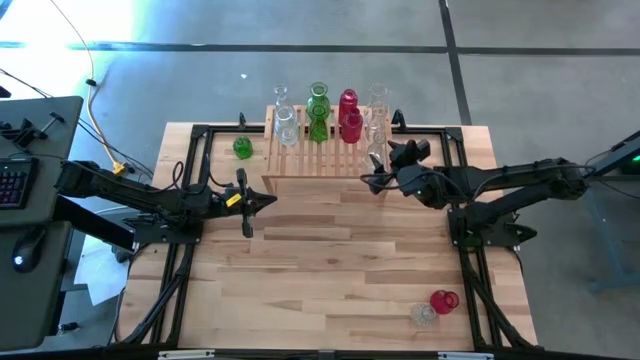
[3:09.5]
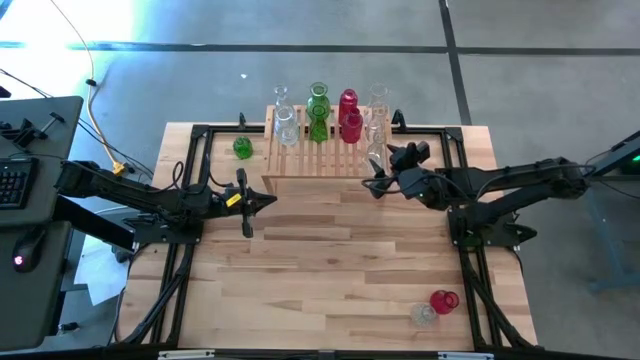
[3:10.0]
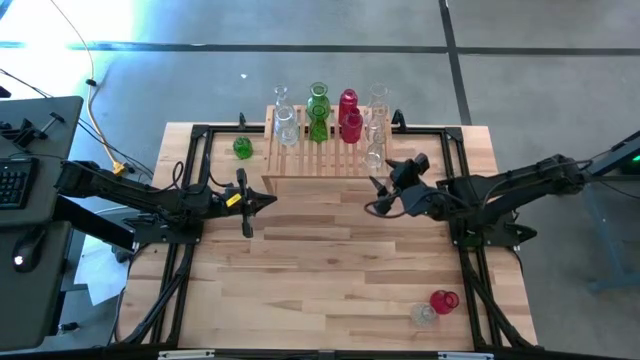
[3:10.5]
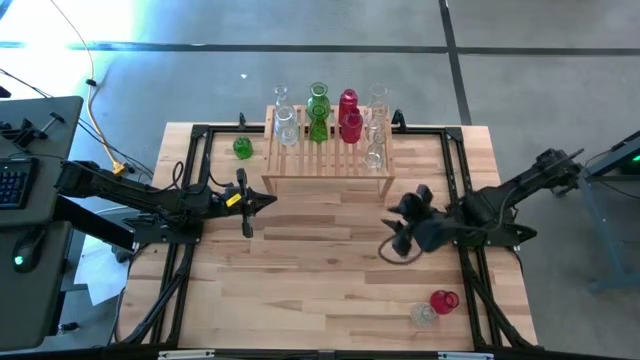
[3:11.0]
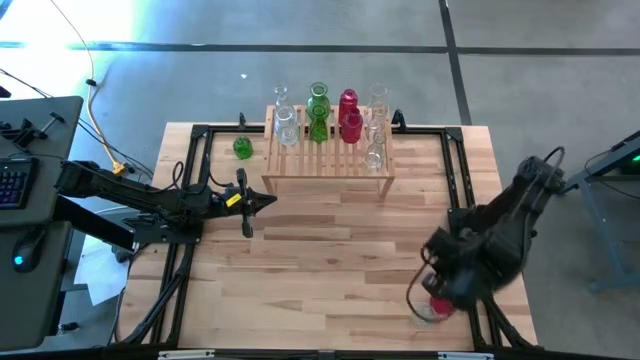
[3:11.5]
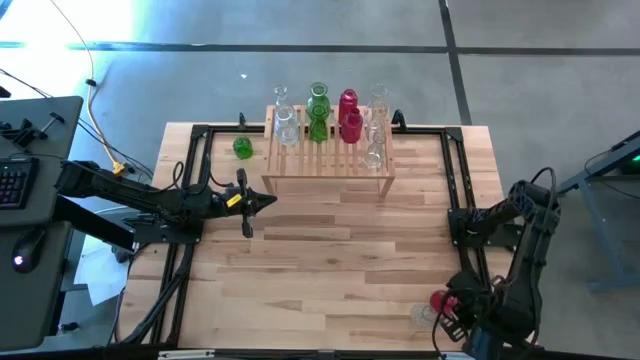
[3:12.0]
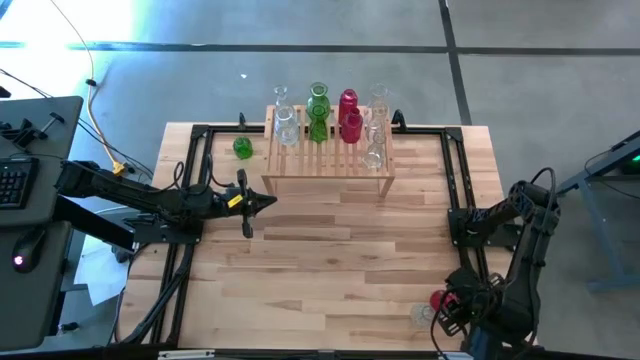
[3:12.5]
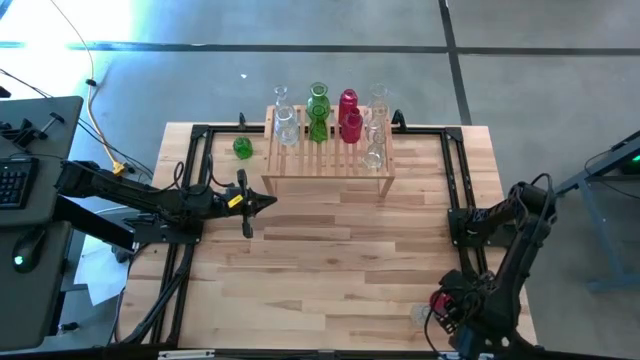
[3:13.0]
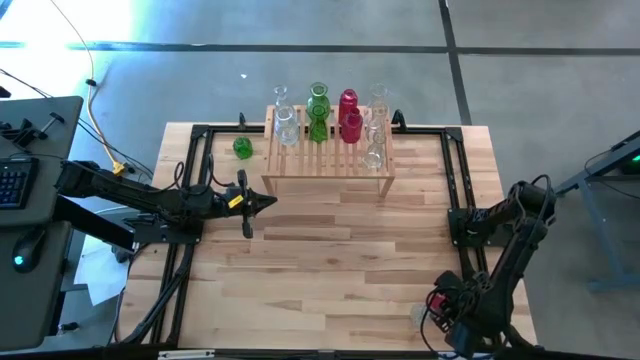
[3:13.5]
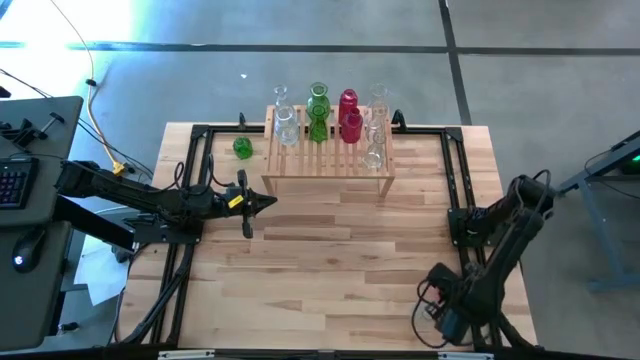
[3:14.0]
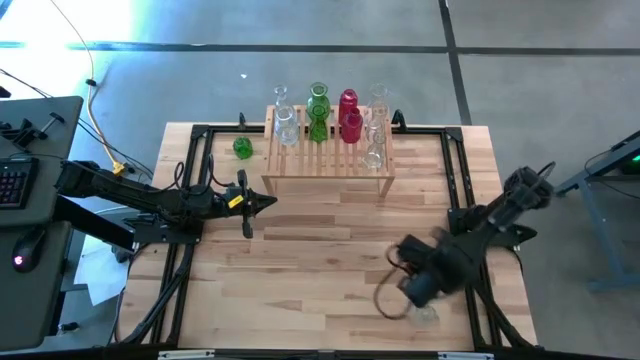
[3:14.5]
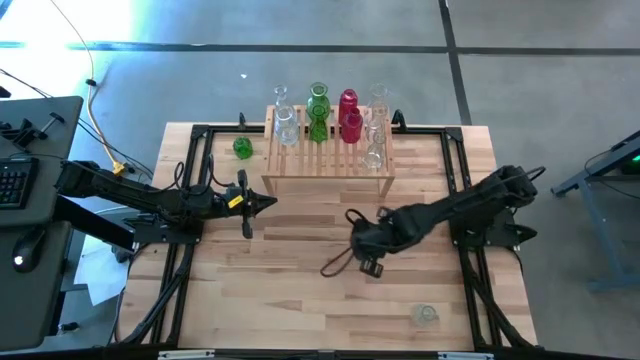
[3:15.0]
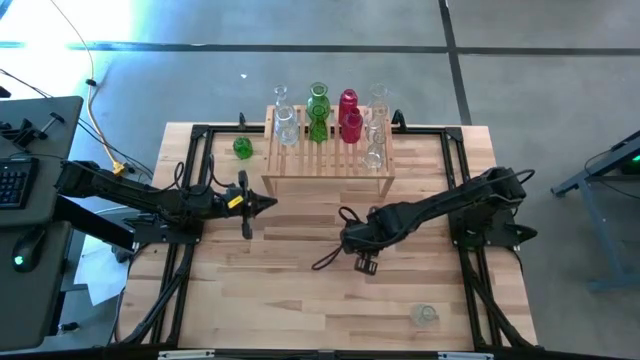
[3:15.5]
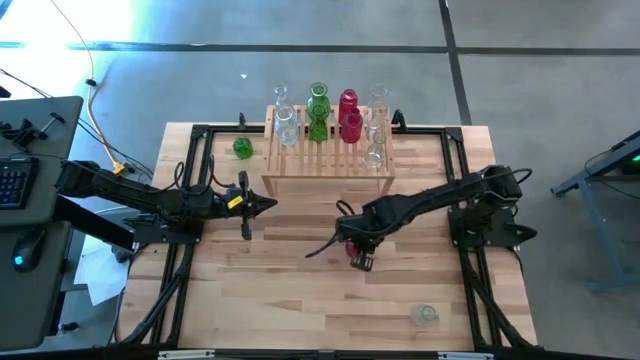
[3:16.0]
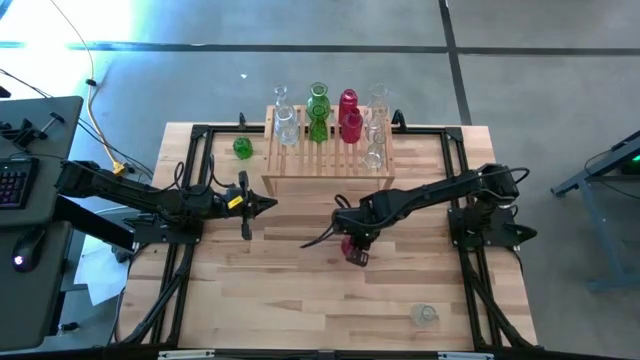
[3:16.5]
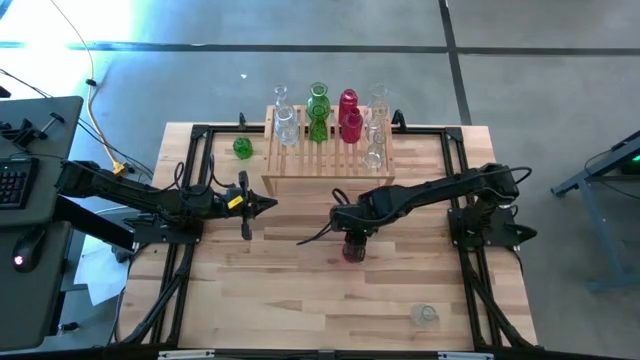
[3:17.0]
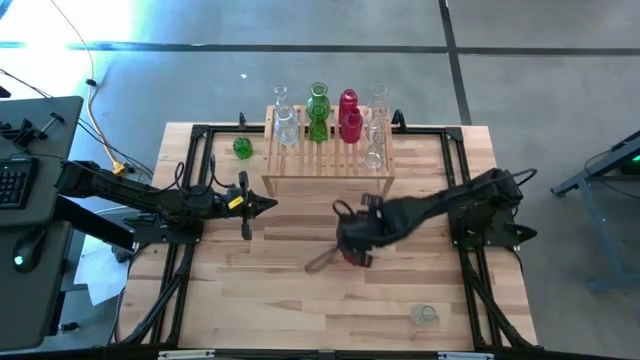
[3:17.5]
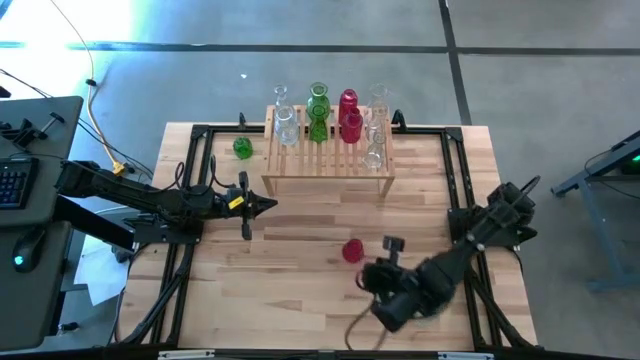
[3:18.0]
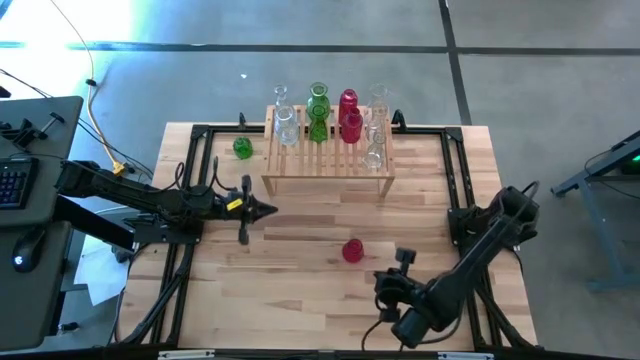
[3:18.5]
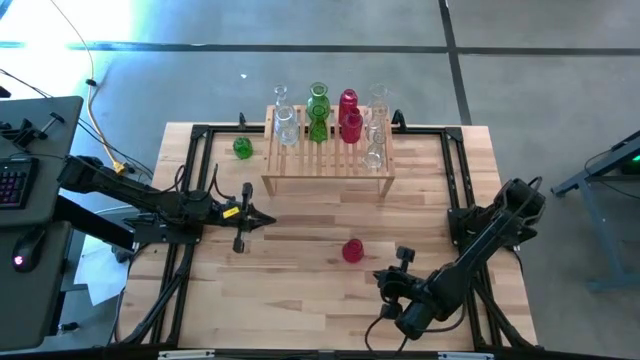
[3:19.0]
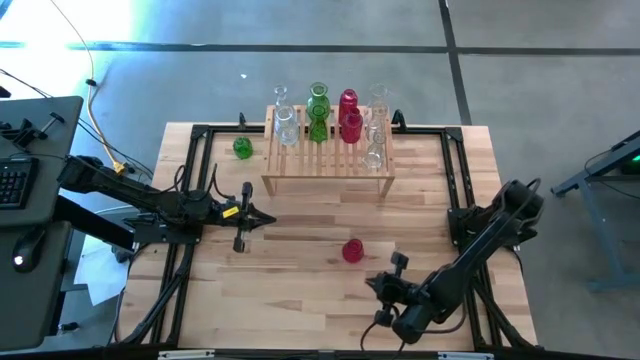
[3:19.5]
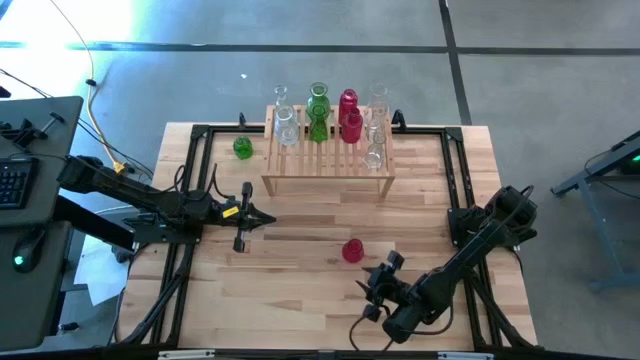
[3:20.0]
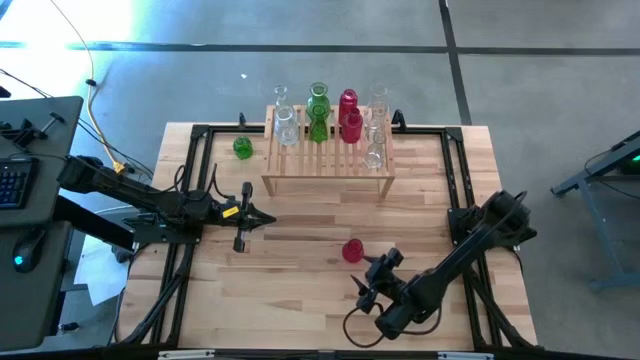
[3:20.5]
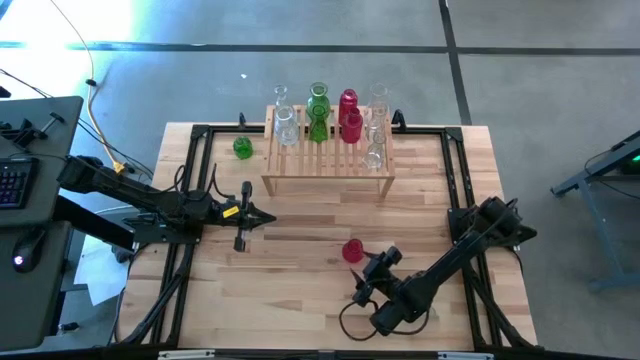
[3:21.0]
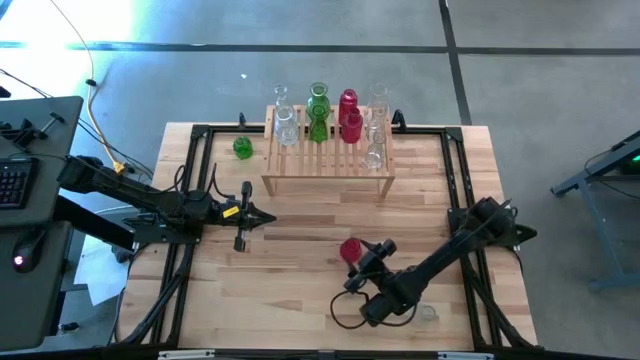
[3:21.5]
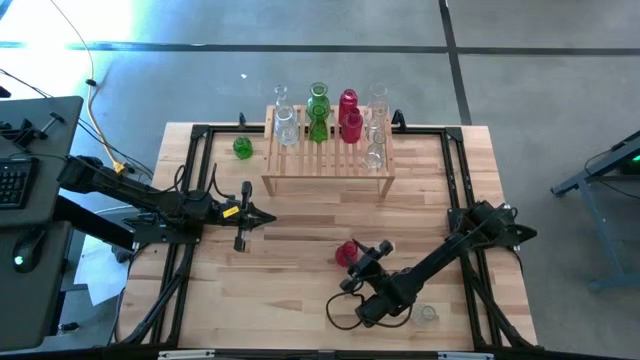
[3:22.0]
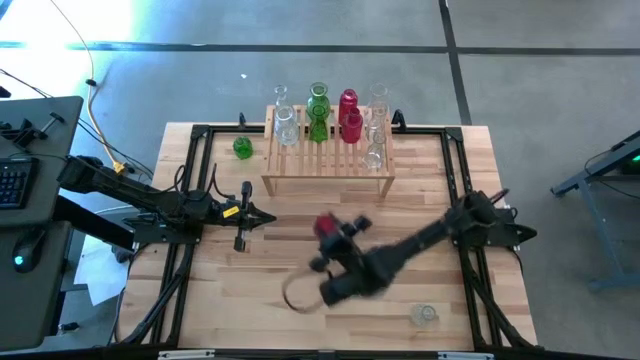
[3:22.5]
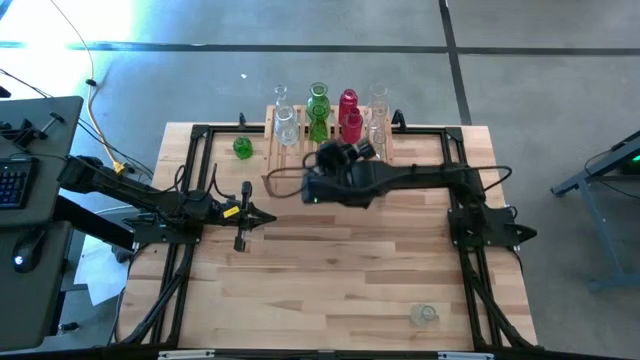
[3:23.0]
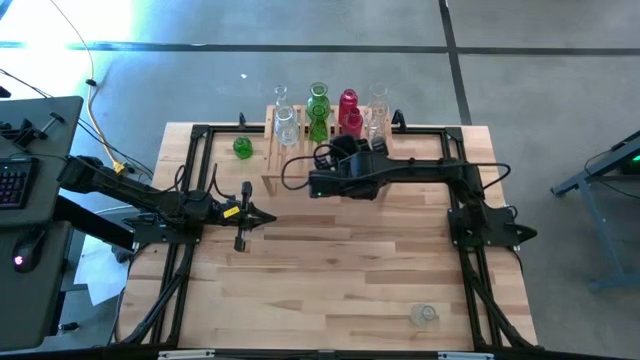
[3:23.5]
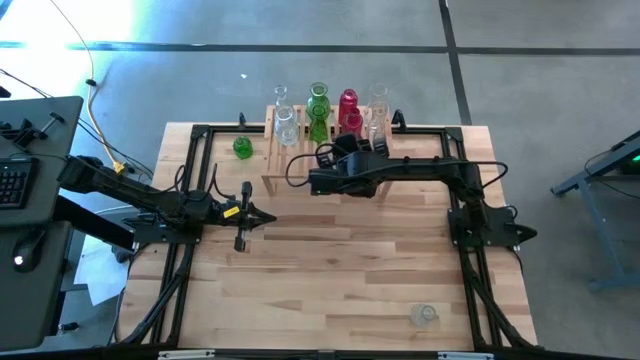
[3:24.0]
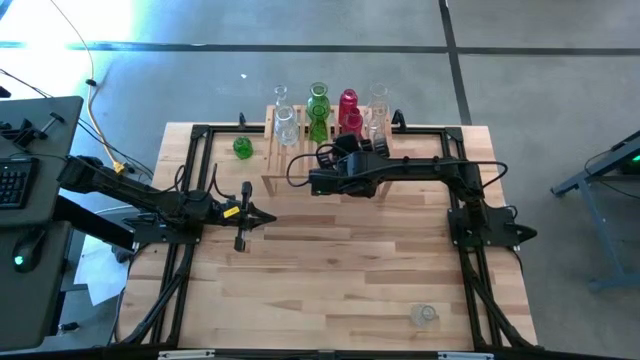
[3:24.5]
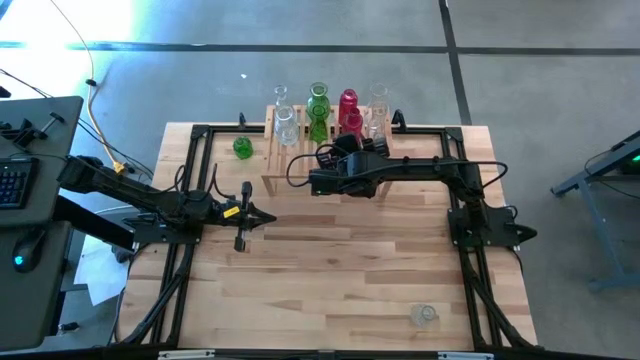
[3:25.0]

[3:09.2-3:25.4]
Task: sort vases onto shelf
Put the red vase on the shelf aligned with the other red vases

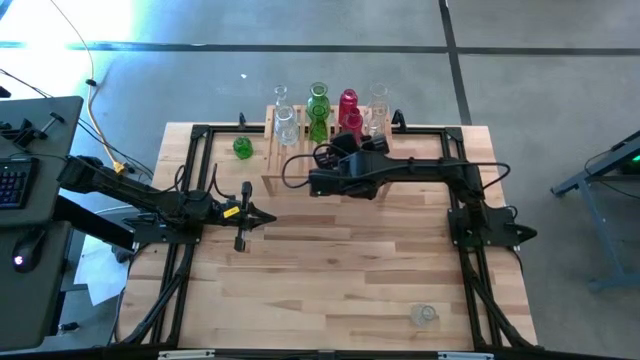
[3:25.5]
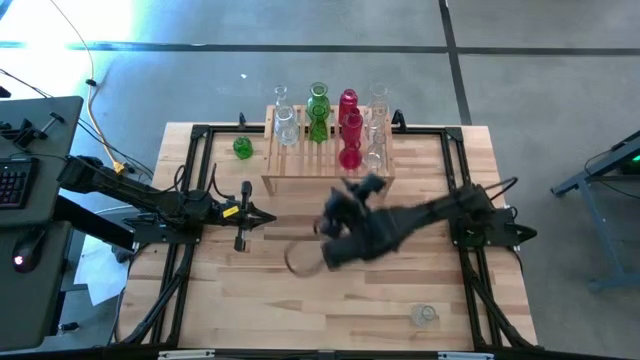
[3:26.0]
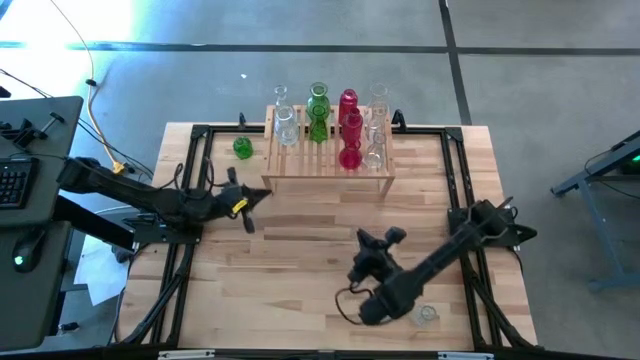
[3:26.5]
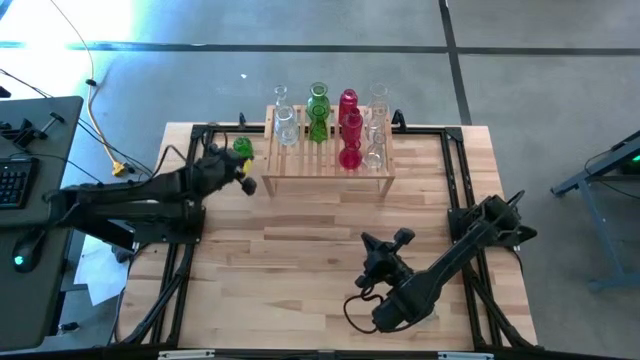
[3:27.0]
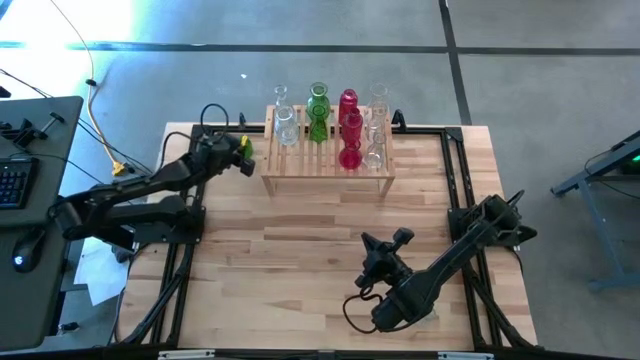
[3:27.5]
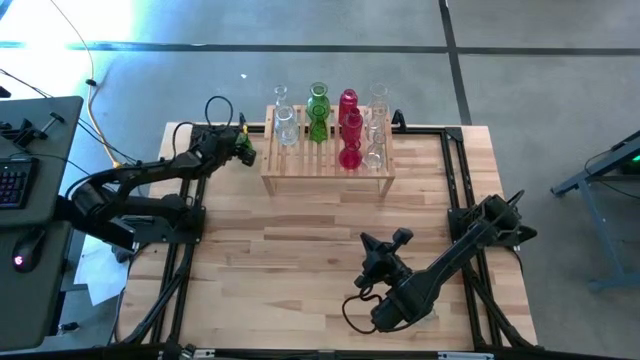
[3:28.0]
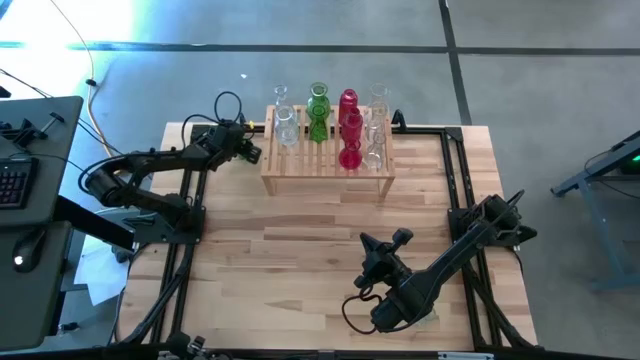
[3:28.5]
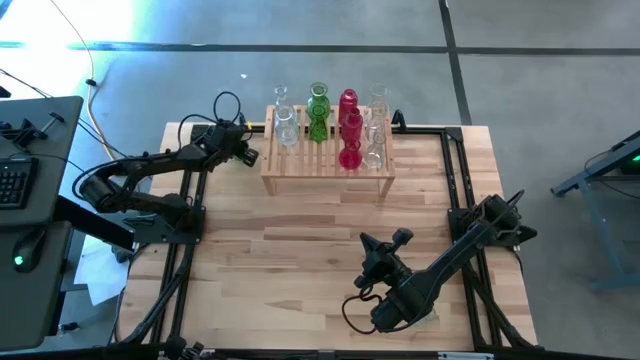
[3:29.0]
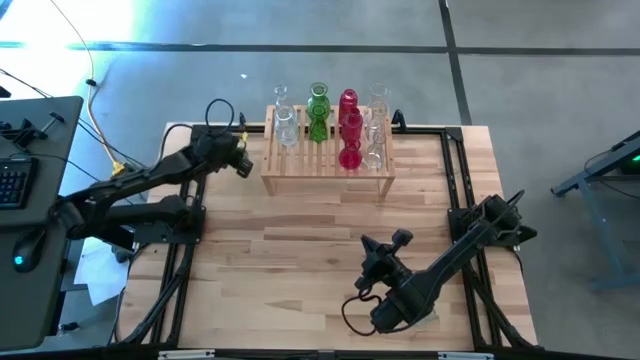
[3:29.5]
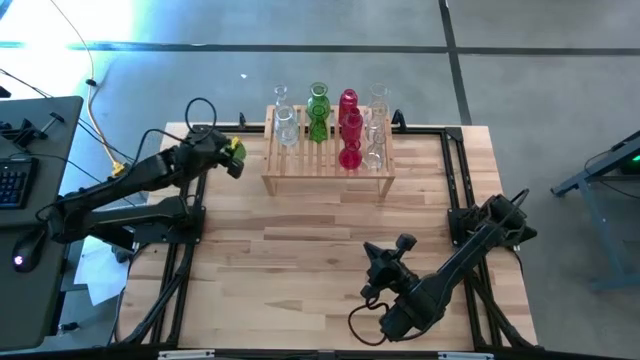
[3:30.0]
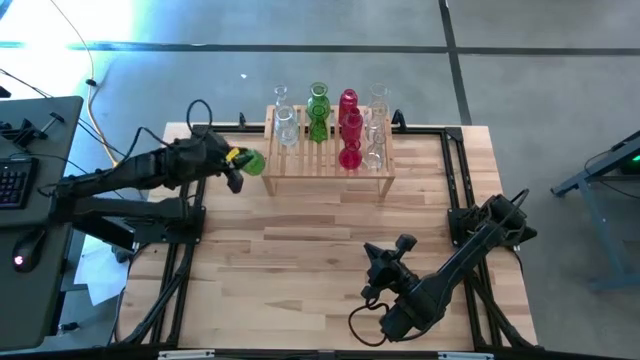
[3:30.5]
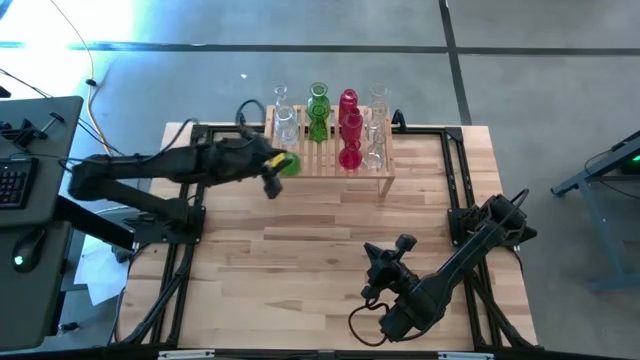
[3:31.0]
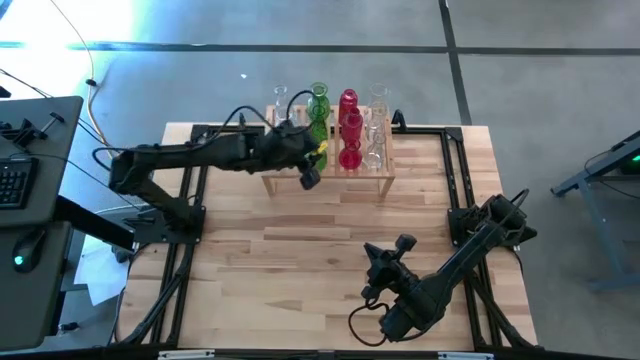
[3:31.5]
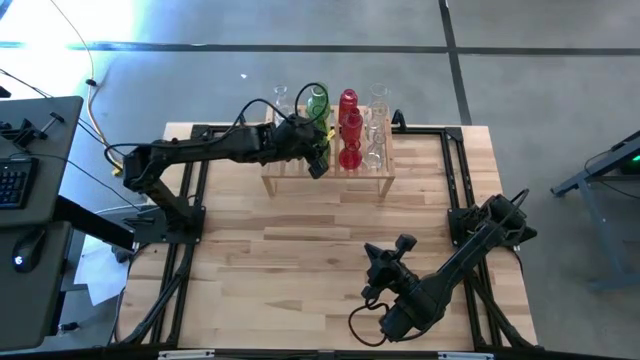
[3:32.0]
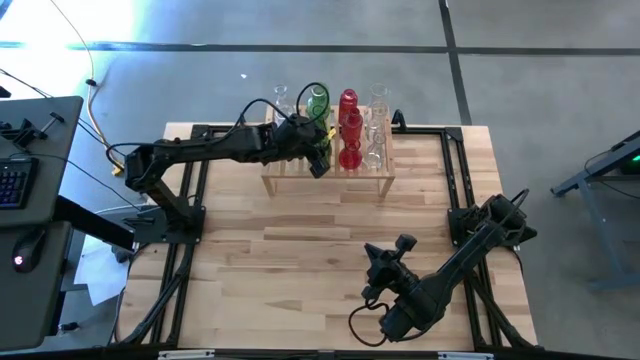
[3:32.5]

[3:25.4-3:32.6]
Put the green vase on the shelf aligned with the other green vases
